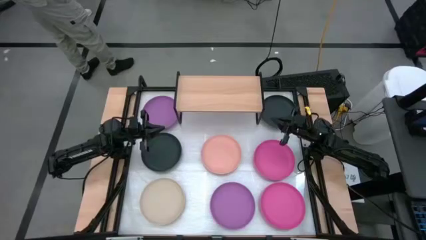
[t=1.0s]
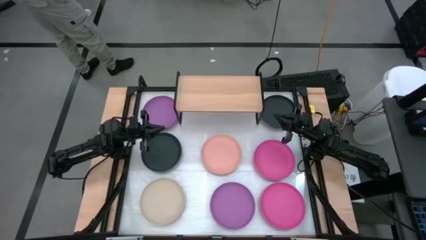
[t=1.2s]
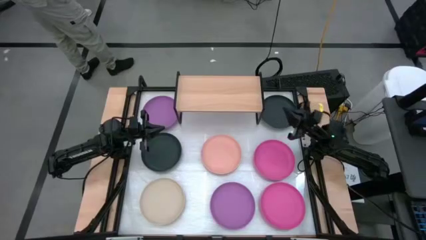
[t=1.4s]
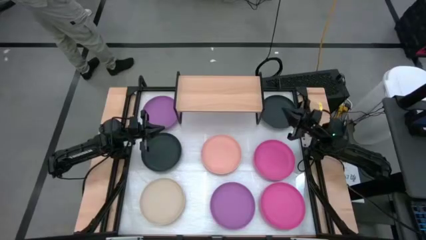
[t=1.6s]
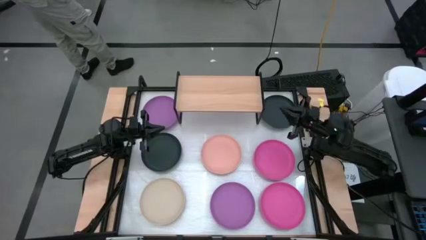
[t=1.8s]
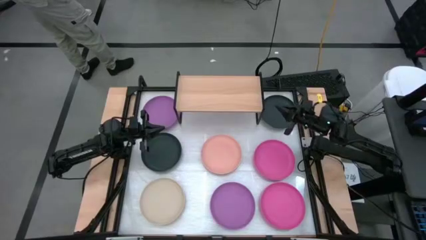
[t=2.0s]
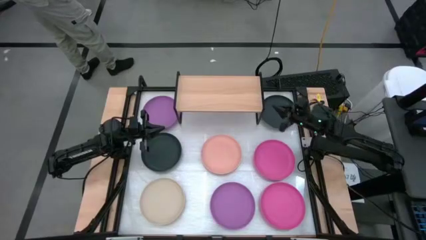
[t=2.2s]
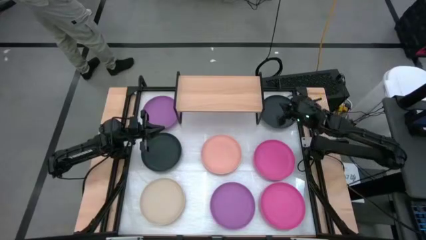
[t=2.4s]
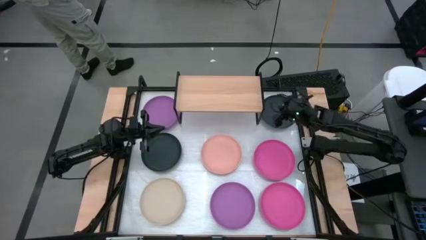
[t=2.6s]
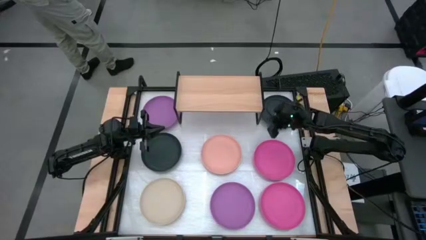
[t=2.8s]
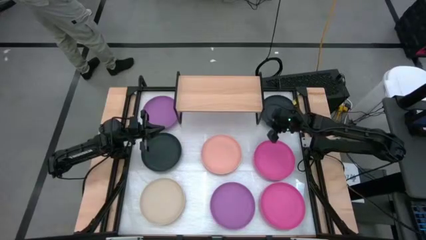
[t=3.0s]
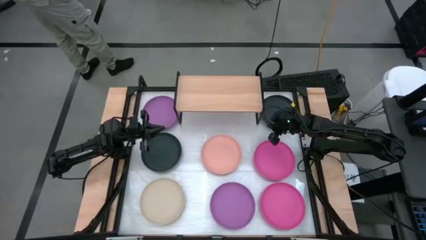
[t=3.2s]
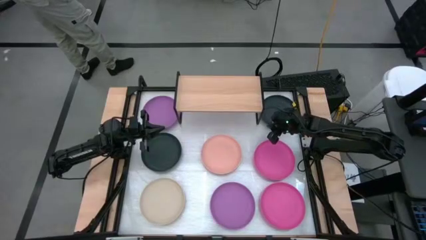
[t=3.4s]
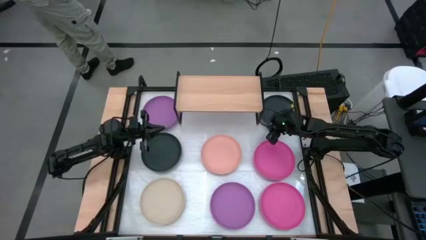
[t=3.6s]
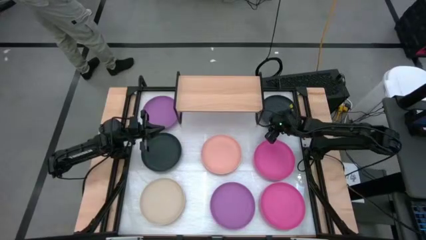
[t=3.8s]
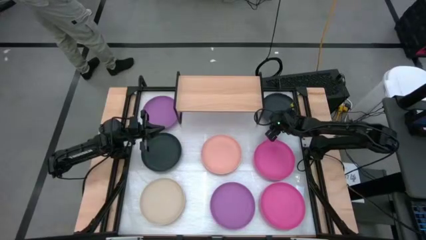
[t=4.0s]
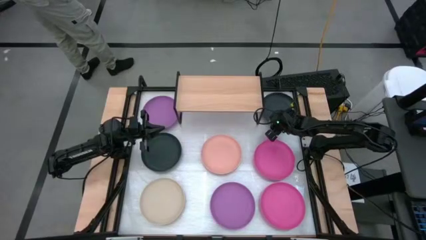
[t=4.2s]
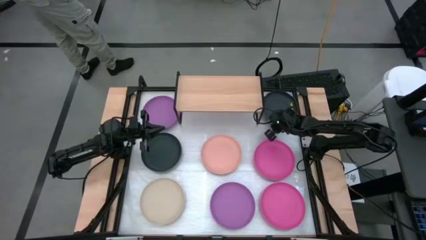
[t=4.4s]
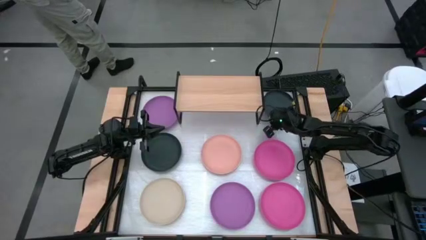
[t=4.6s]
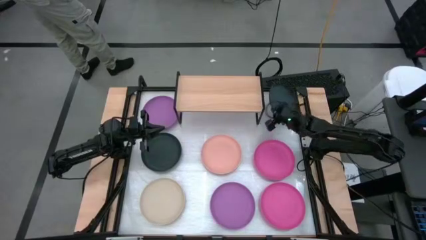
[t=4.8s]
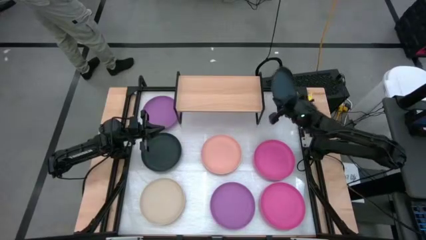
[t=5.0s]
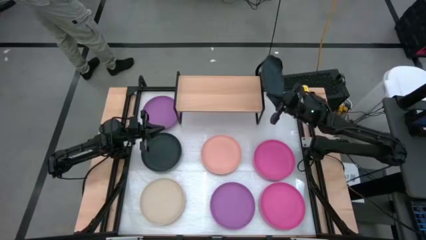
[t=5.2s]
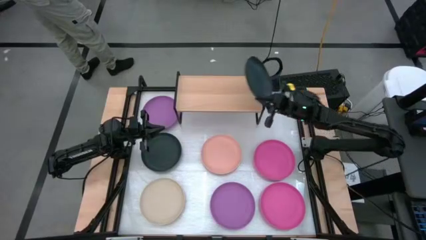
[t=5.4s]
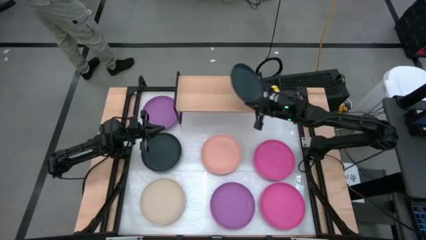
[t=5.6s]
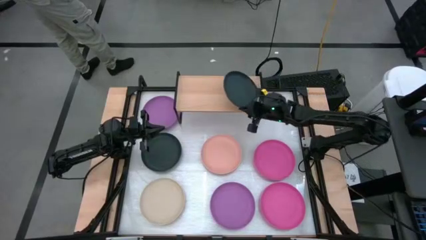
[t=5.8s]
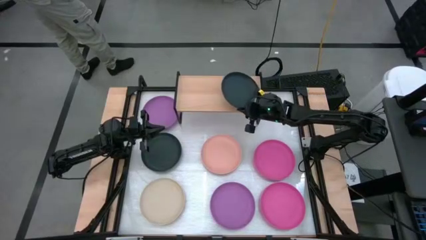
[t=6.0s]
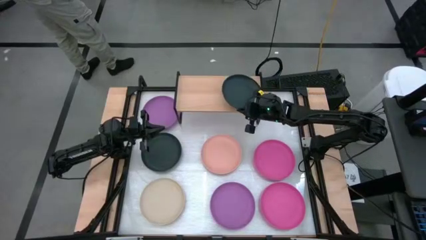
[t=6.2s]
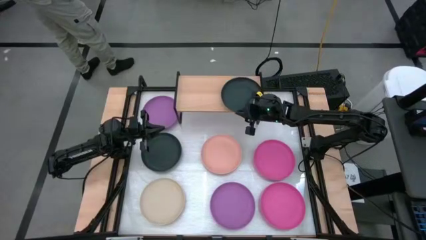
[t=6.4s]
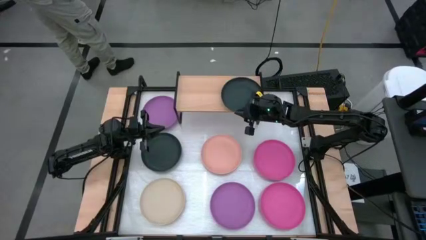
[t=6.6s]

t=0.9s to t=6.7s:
Task: Place and stack plates onto a shelf
Put the top black plate on the shelf

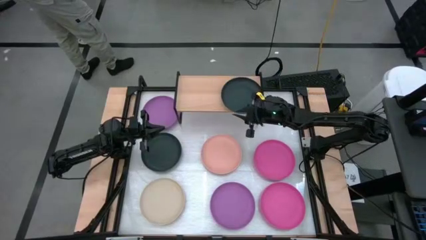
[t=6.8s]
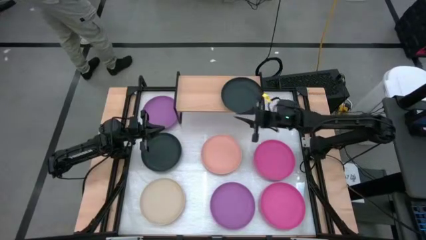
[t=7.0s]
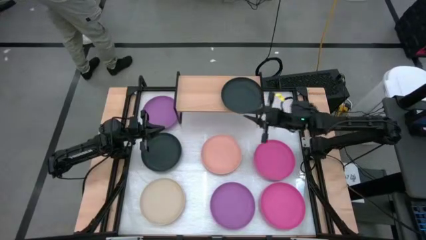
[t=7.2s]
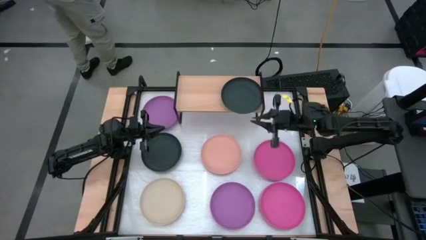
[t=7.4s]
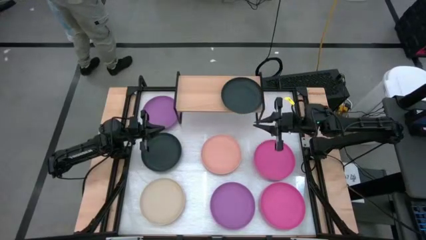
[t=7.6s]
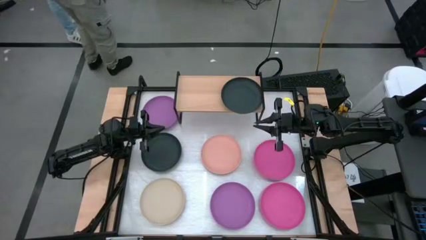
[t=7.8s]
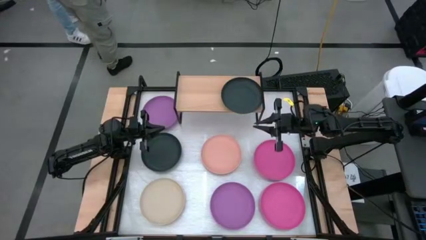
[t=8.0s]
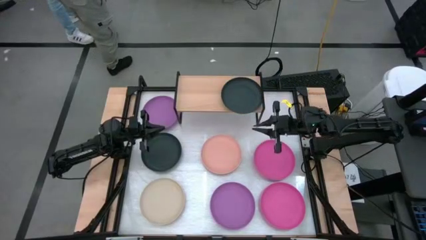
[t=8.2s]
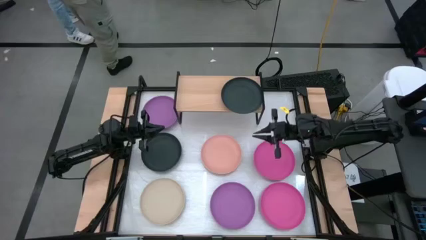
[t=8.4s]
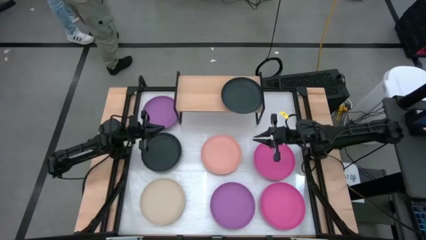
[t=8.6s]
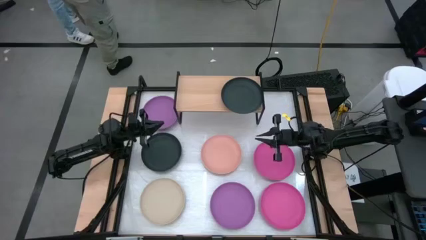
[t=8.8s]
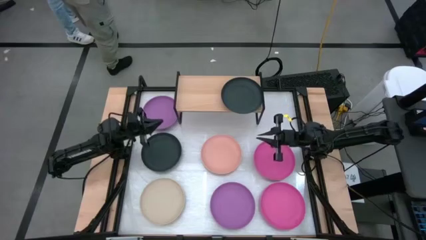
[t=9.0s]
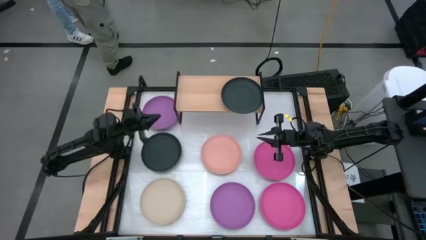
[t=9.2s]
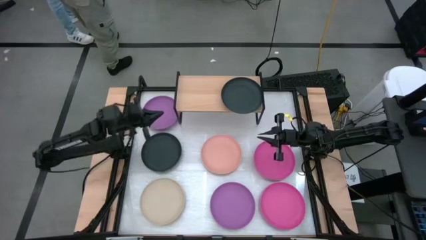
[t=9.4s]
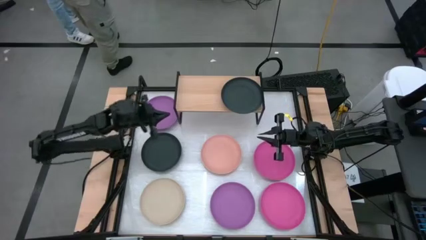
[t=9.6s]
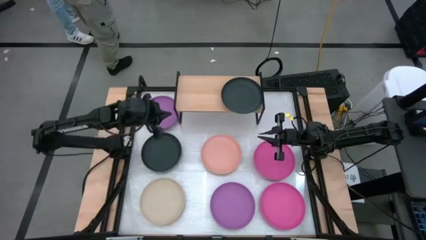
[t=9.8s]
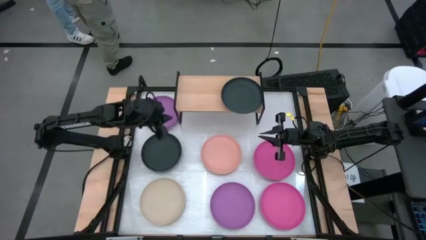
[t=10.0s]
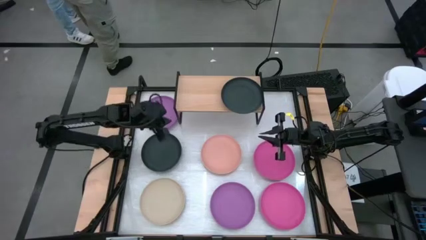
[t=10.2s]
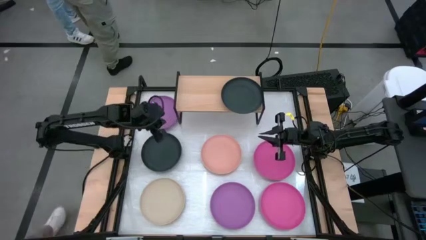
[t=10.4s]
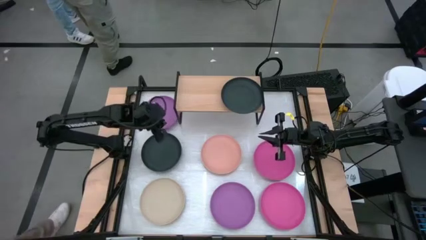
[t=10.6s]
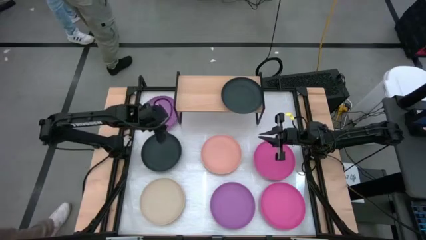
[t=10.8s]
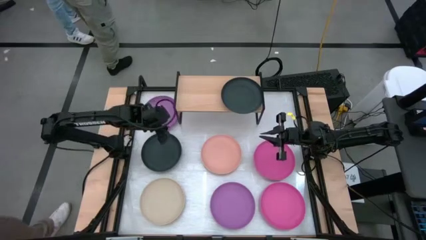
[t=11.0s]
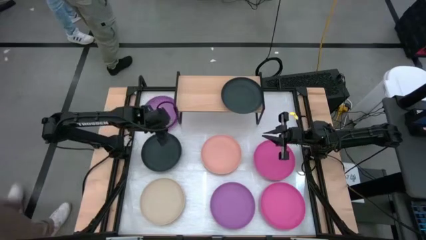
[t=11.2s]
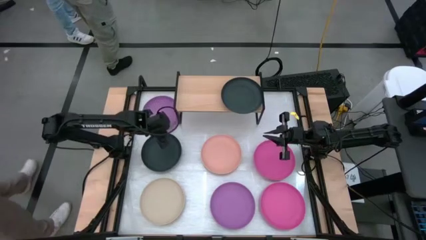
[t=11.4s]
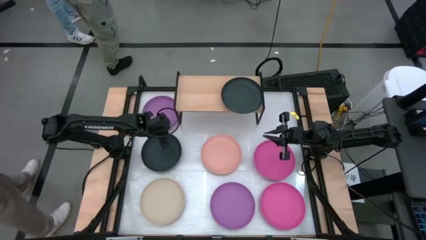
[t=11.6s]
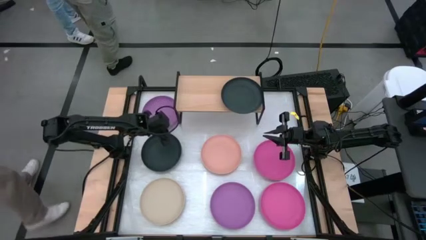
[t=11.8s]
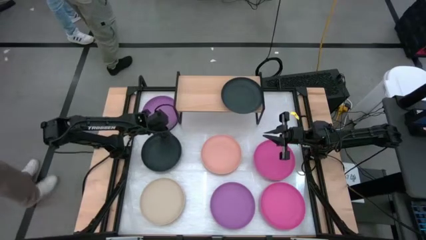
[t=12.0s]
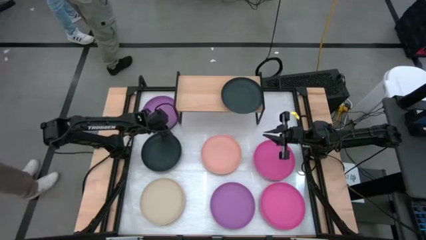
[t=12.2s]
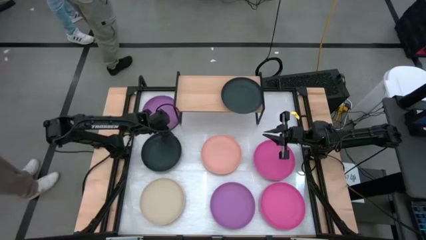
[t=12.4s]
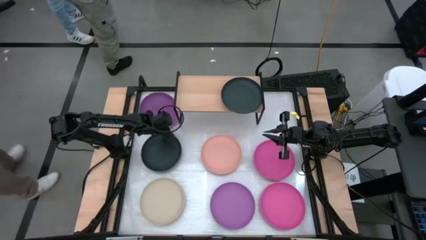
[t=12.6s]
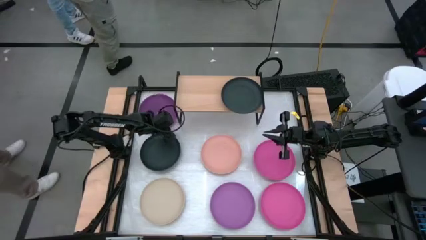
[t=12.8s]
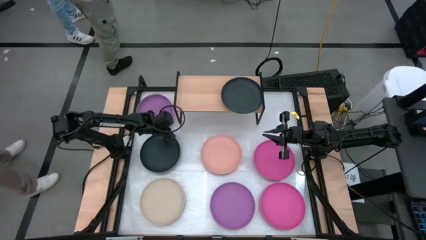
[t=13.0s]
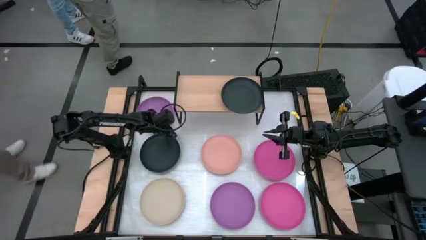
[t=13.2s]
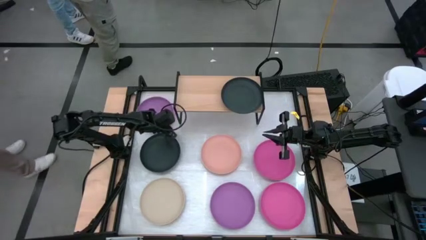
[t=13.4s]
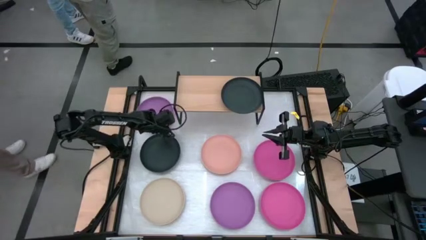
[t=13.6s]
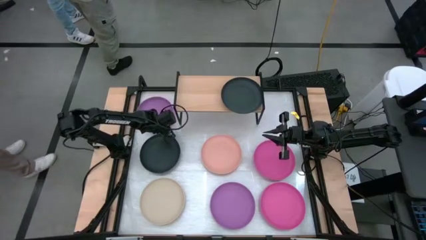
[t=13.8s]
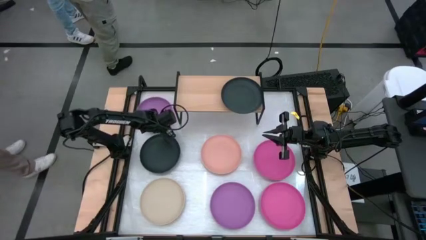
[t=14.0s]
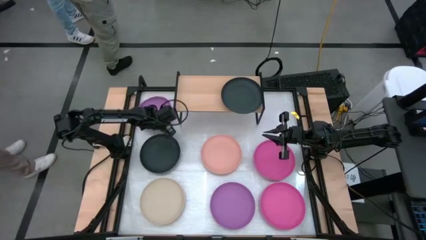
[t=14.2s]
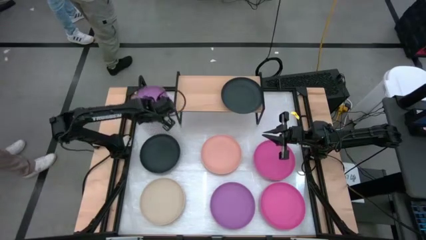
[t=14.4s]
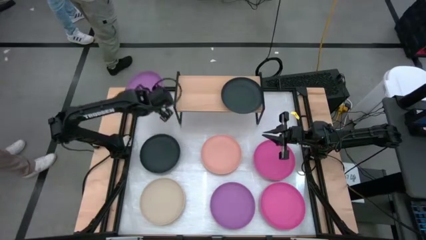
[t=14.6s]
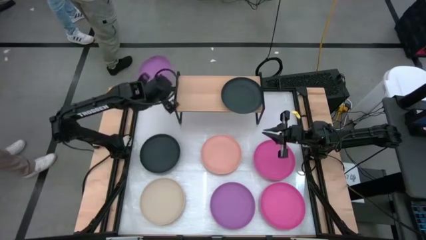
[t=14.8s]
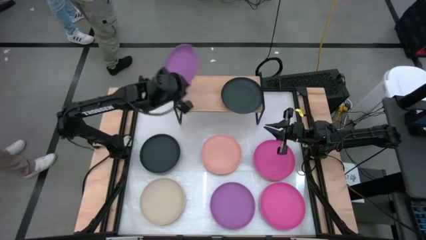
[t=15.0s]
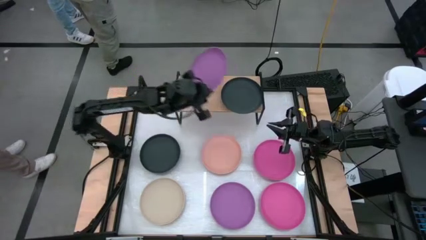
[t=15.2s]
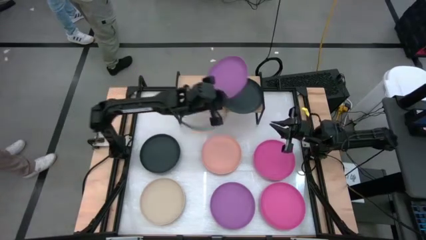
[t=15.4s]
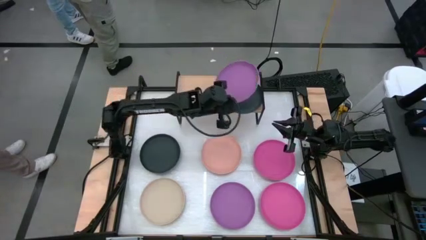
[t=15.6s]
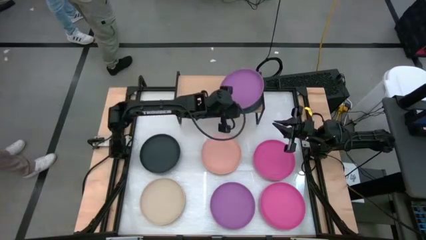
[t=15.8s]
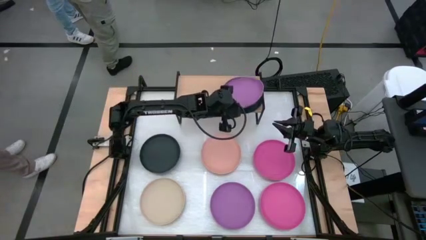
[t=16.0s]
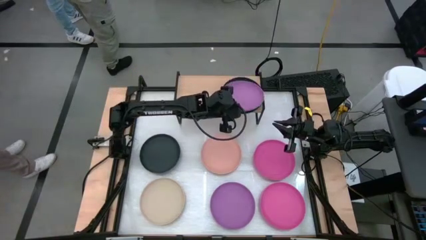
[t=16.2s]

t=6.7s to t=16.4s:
Stack the top purple plate on top of the black plate on the shelf
